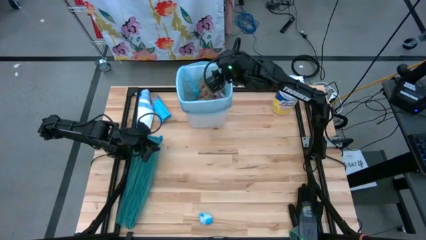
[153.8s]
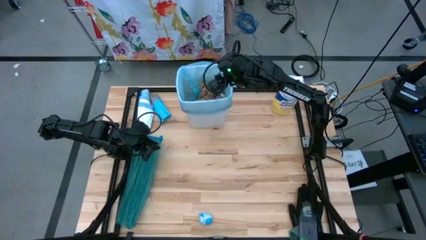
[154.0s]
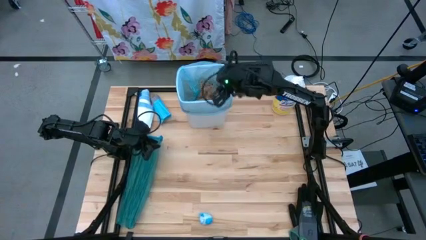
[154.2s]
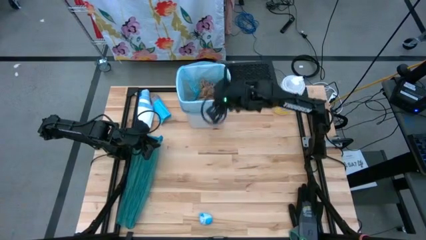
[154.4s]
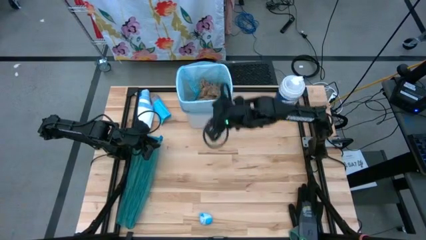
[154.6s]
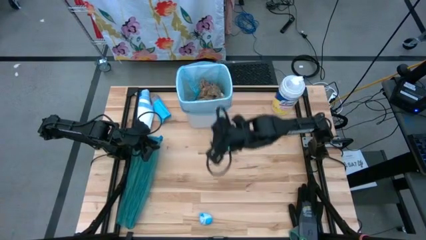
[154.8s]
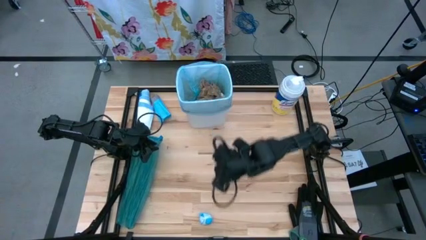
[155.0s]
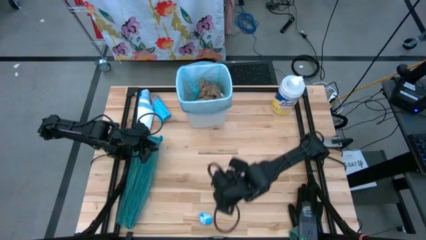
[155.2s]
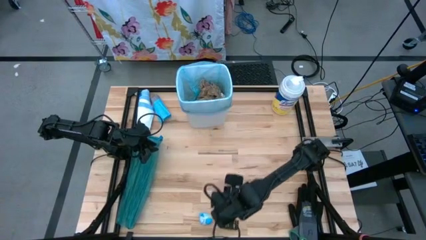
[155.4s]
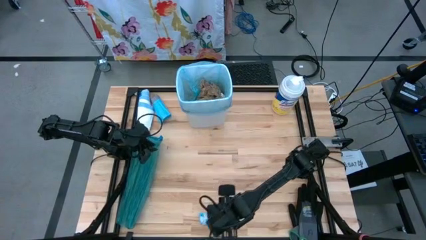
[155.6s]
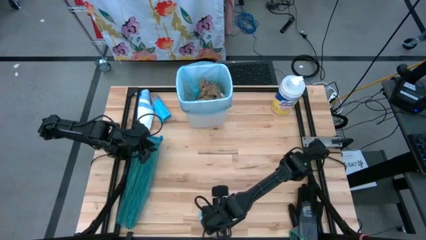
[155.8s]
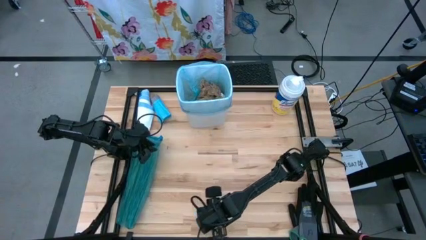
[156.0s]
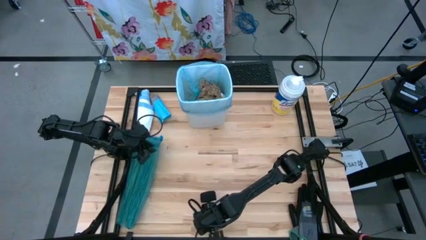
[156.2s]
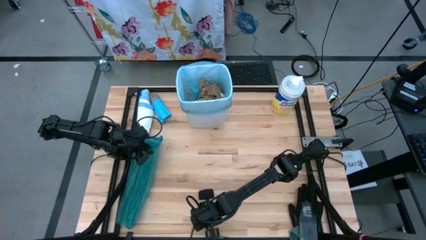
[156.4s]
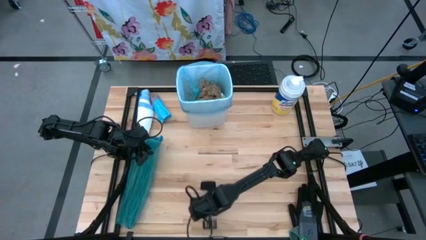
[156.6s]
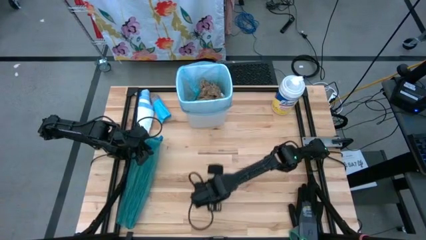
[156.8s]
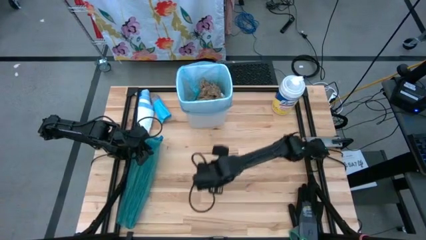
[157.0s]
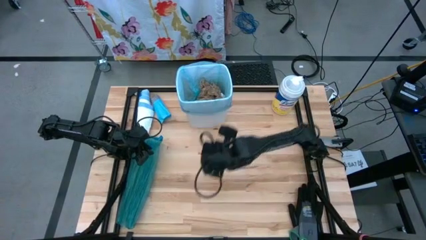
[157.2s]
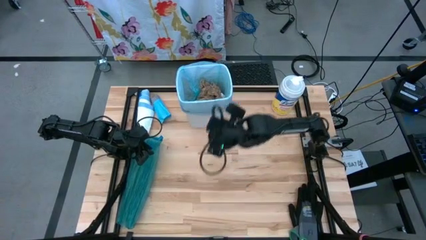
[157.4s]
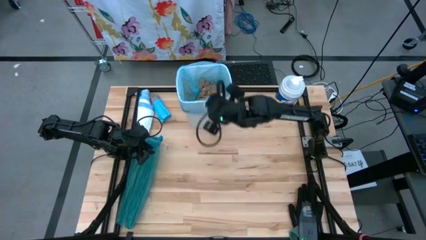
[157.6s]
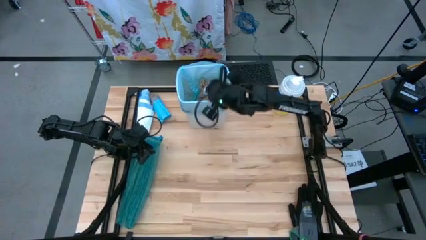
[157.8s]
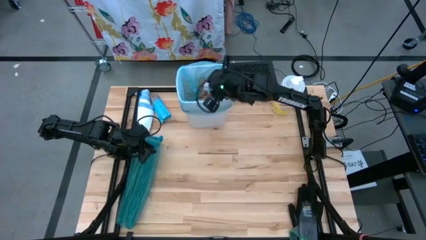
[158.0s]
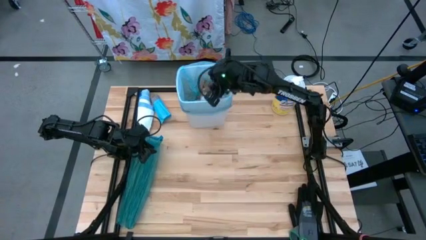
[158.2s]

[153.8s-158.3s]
Task: place trash/remove bag and relplace
Put the blue plastic into the white trash bin

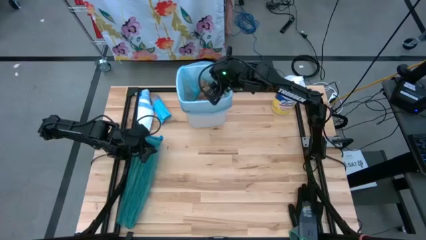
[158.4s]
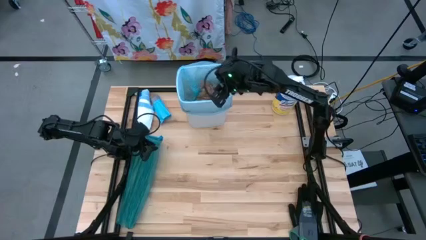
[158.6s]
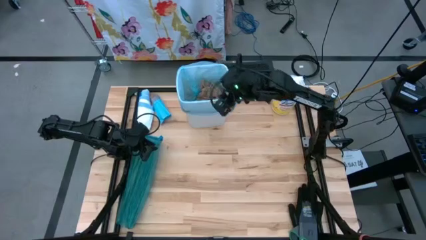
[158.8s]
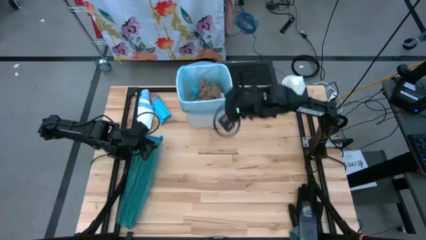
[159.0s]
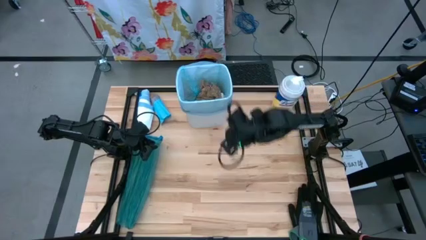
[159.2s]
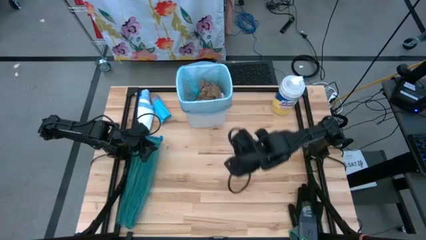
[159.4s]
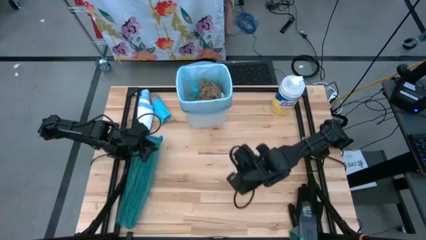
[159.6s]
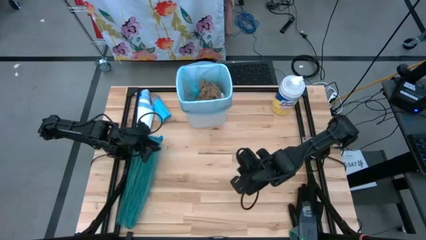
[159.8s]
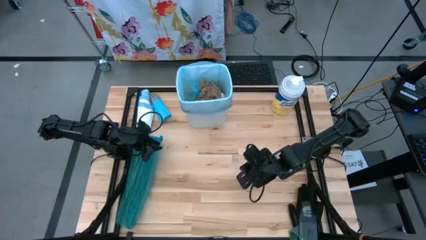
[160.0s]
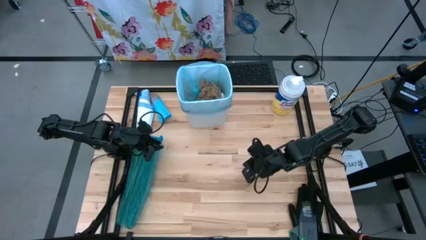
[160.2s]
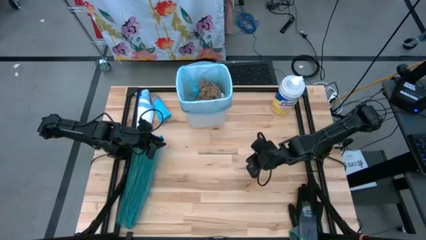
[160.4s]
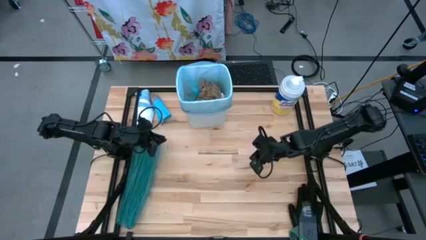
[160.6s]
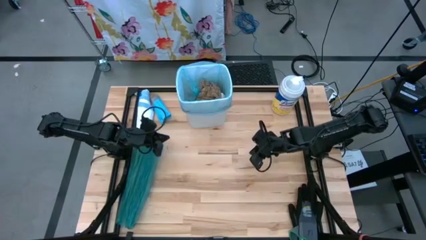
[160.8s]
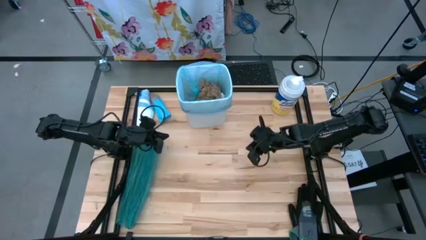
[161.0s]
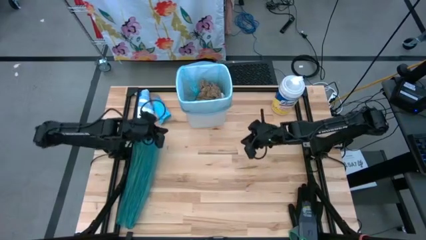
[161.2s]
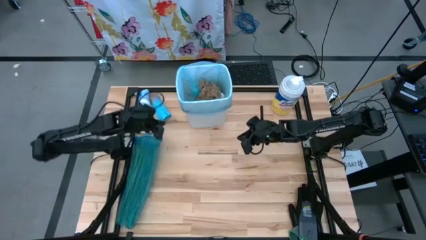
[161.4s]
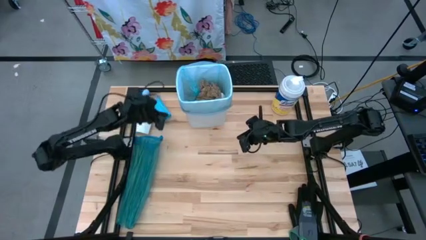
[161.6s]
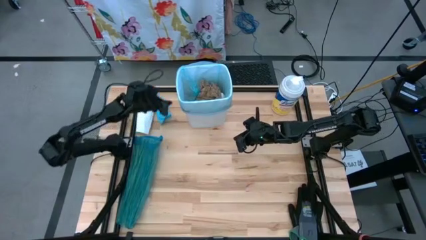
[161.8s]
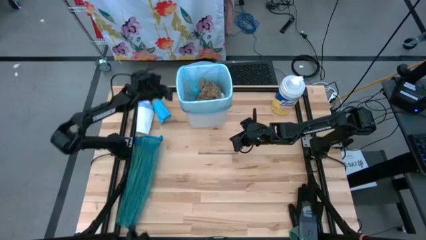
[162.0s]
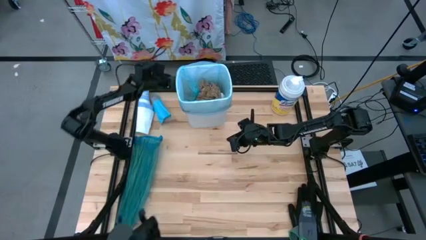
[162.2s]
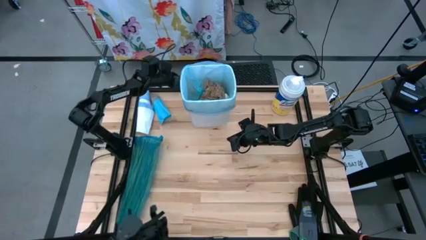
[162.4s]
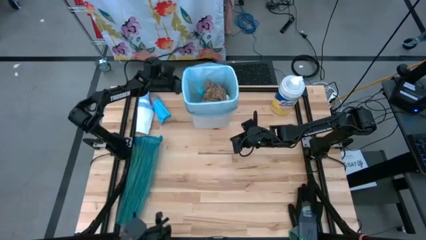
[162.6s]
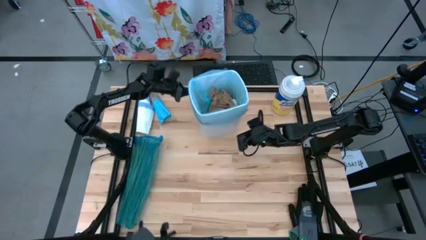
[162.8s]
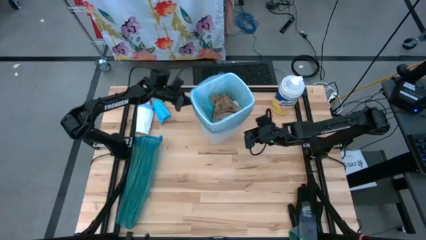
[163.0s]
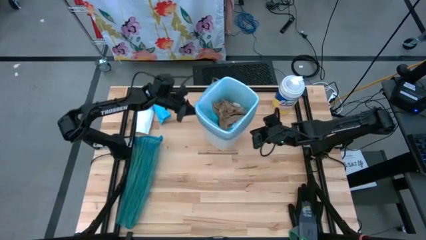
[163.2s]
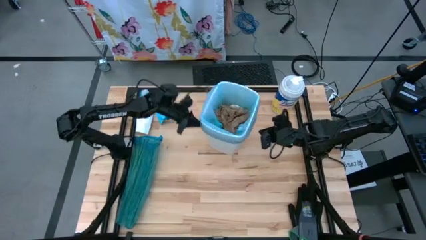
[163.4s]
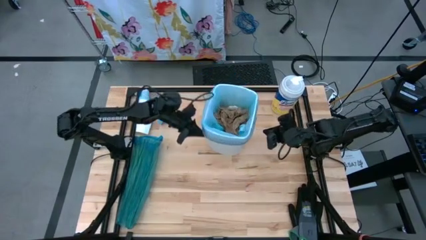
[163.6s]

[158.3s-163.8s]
Adjust the white trash bin on the table

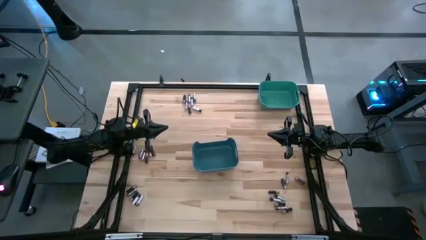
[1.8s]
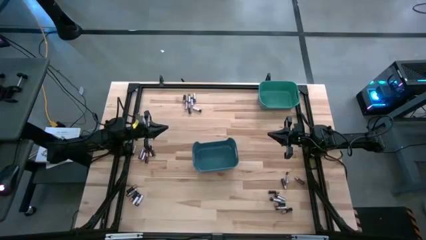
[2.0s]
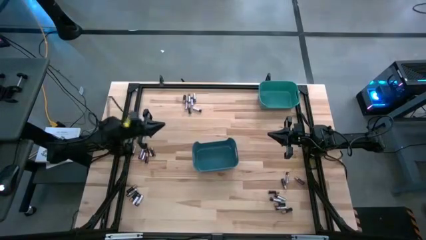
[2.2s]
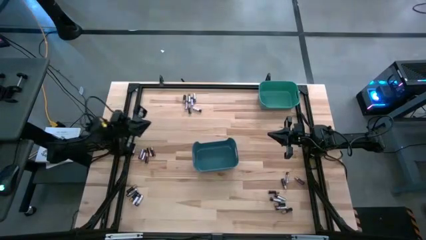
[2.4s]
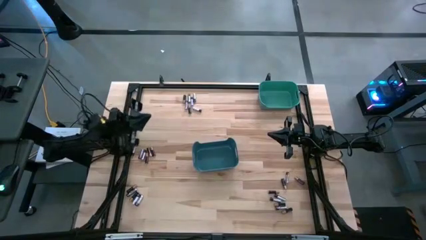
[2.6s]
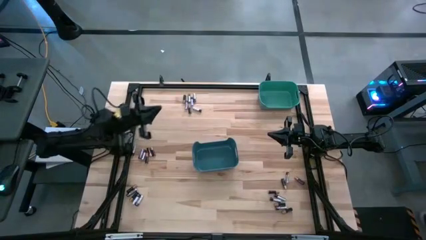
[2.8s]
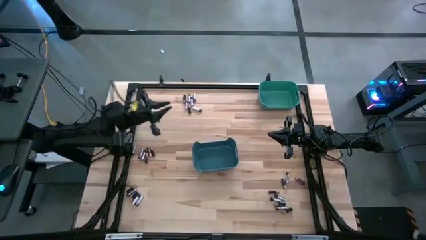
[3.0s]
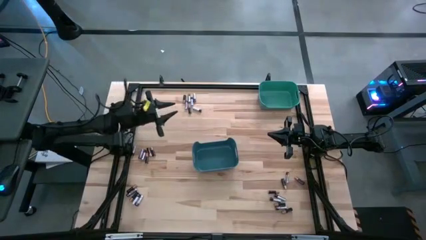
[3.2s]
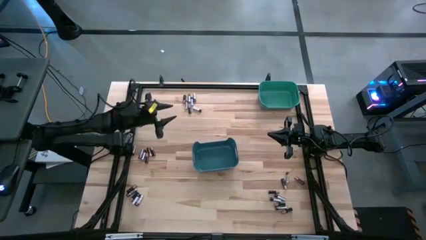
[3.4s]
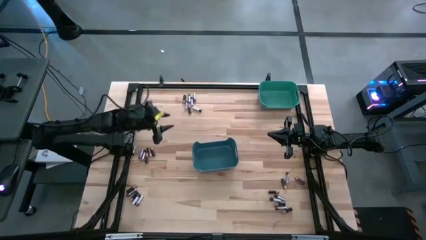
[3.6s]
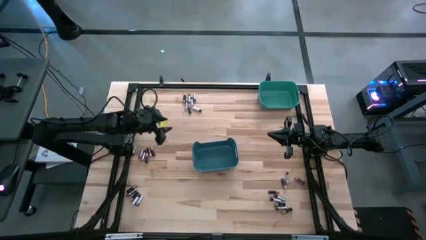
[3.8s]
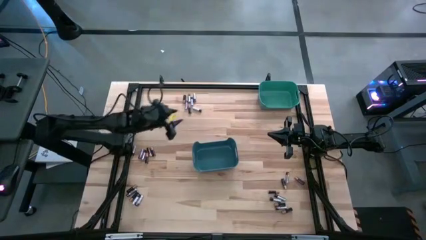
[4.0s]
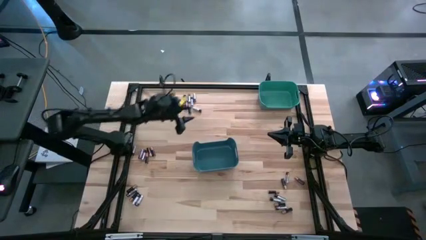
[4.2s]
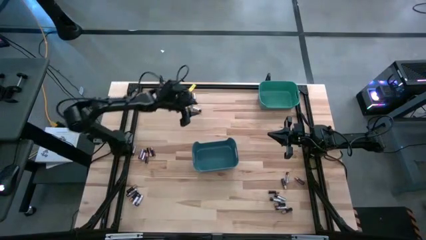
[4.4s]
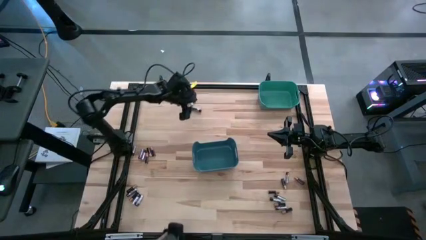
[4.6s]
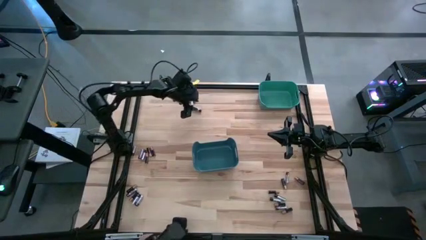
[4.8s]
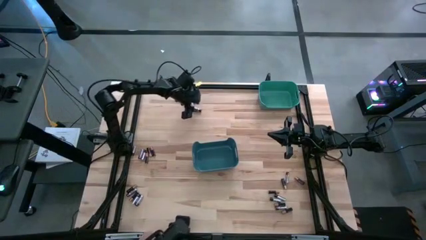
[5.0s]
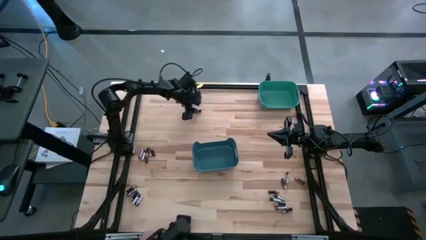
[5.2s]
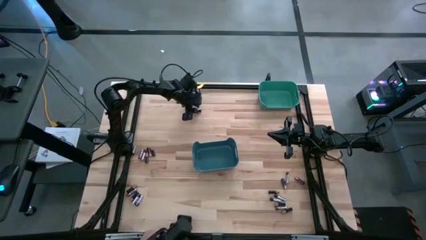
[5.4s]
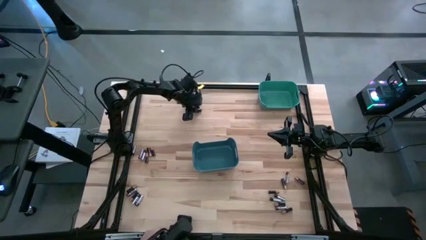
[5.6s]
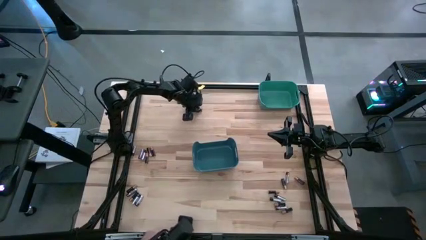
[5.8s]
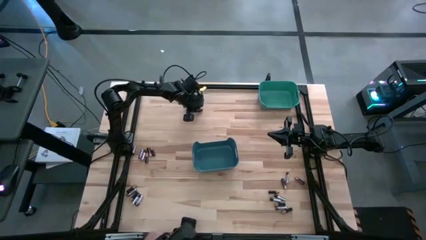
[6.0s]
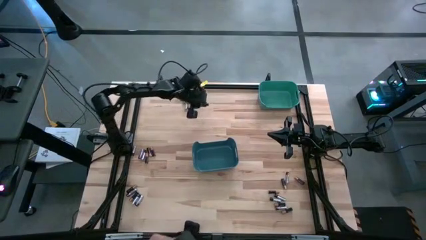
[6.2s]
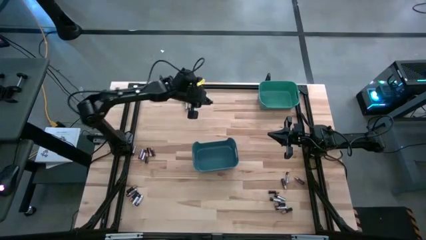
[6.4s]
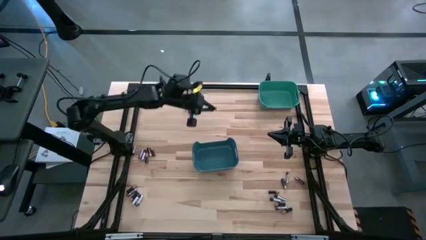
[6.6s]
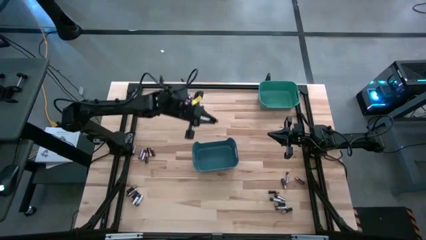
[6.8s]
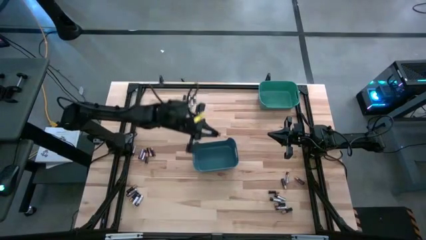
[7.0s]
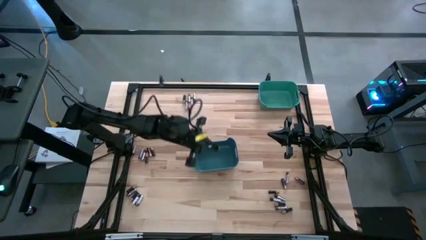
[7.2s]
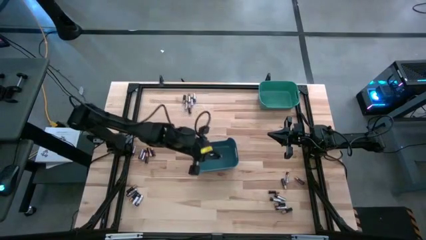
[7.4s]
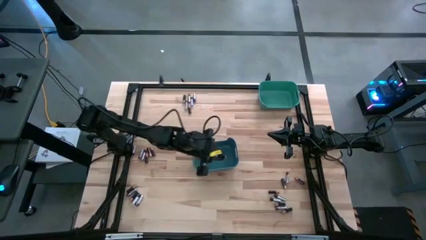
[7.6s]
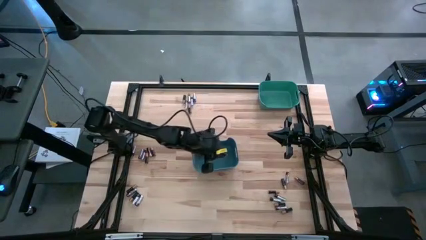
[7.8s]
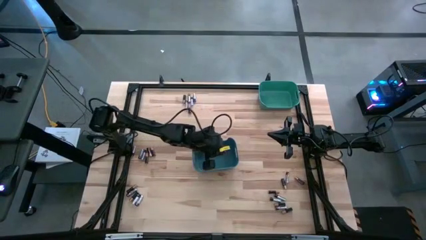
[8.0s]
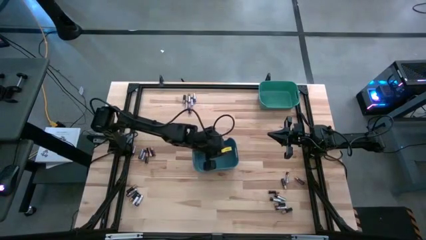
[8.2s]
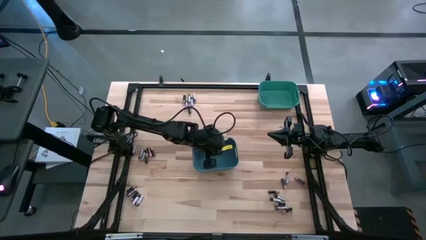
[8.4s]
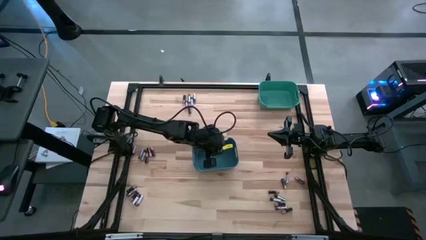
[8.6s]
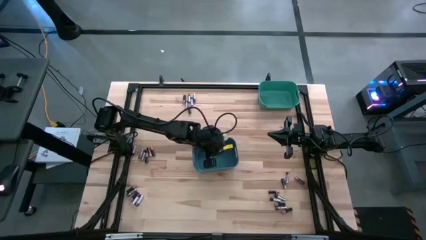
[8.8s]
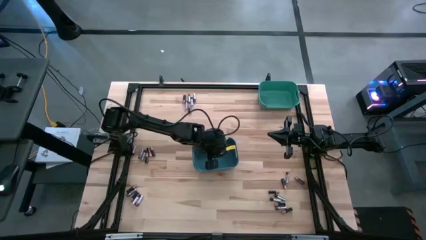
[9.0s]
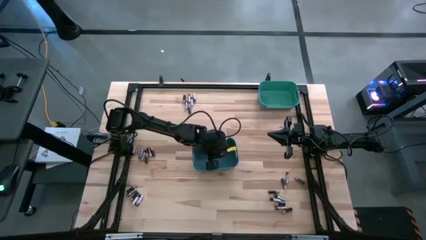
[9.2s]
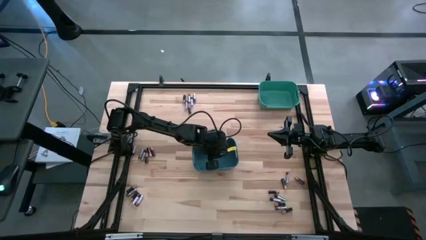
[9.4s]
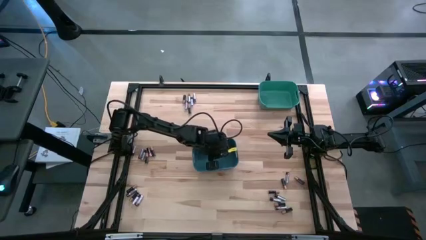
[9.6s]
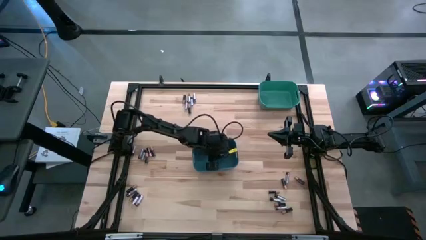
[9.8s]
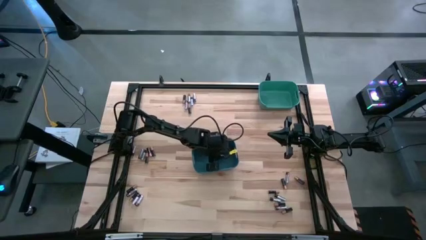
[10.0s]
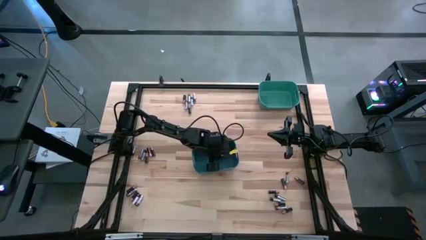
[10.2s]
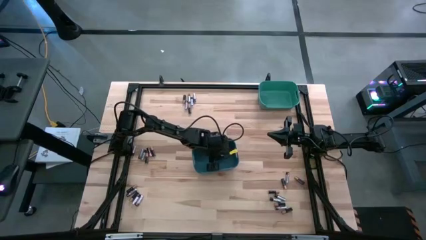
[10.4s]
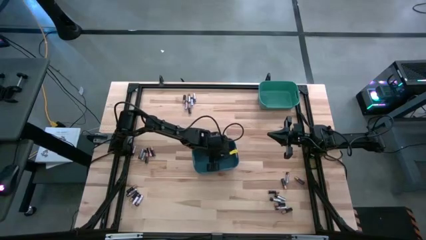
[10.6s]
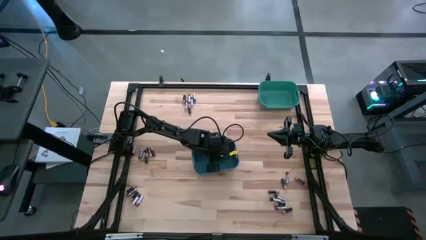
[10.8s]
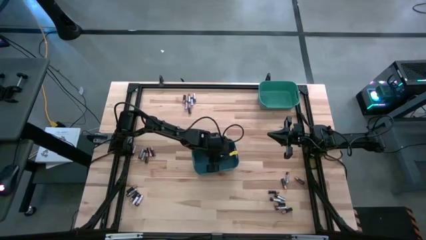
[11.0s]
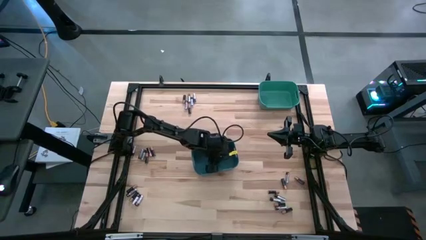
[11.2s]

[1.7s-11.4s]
Task: Sort batteries
Put the silver battery into the blue bin
